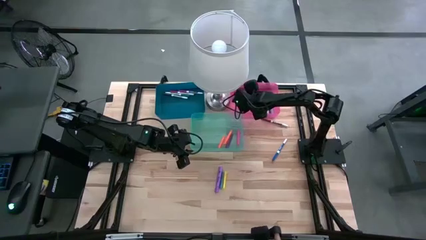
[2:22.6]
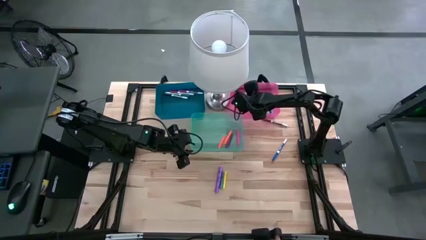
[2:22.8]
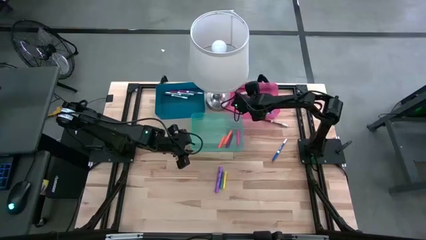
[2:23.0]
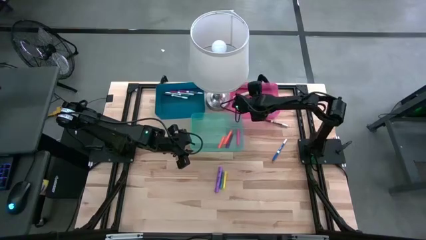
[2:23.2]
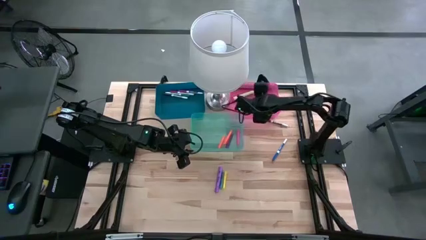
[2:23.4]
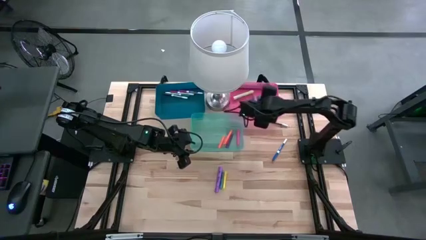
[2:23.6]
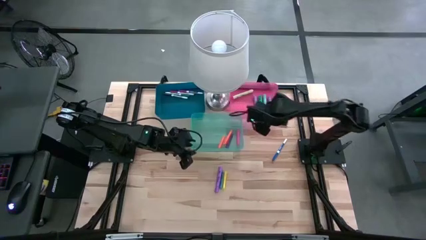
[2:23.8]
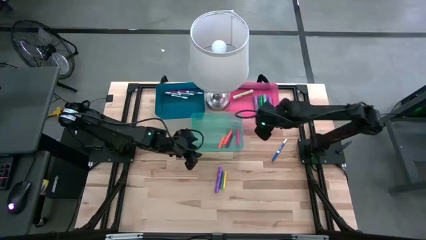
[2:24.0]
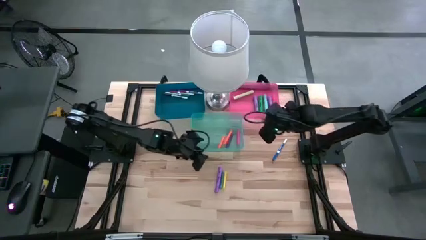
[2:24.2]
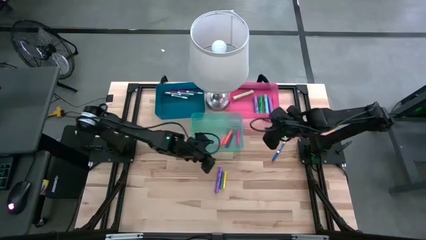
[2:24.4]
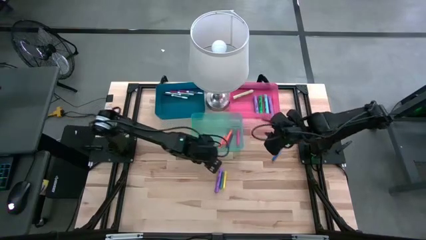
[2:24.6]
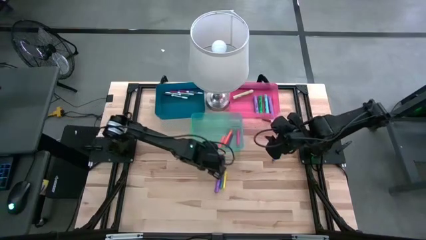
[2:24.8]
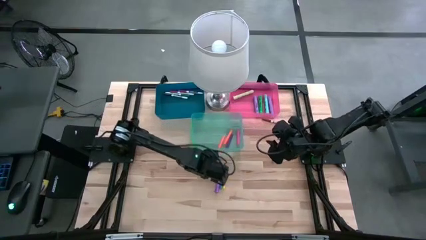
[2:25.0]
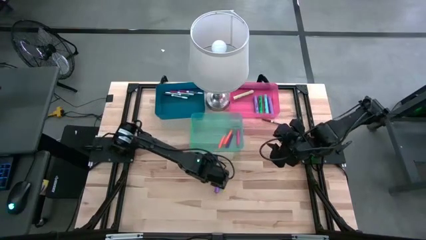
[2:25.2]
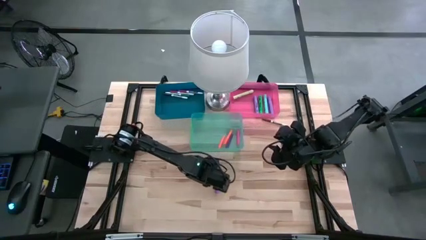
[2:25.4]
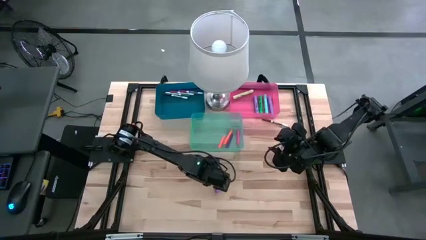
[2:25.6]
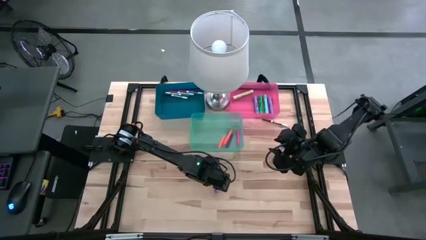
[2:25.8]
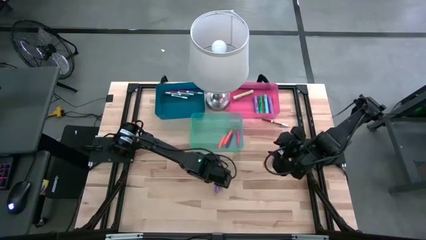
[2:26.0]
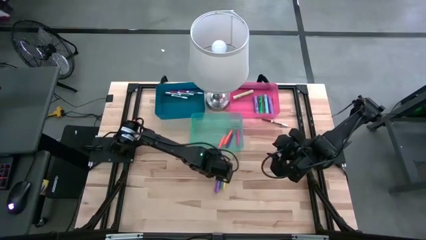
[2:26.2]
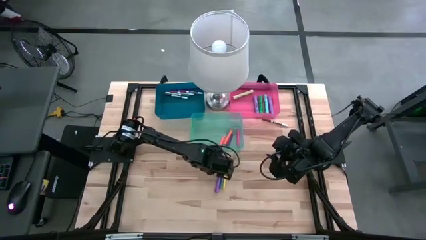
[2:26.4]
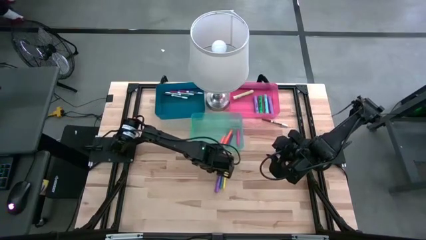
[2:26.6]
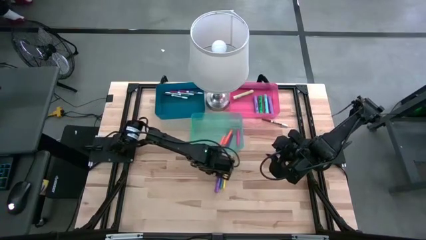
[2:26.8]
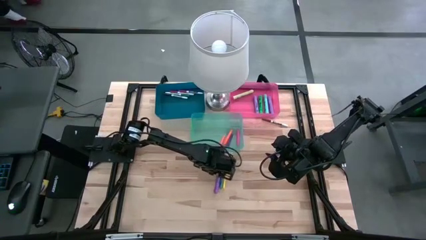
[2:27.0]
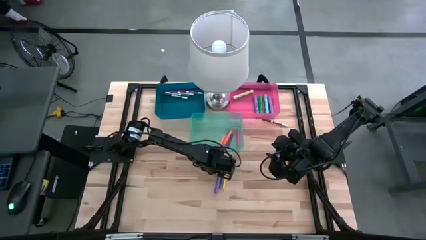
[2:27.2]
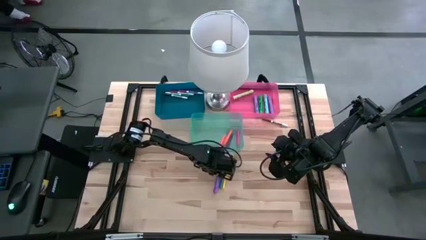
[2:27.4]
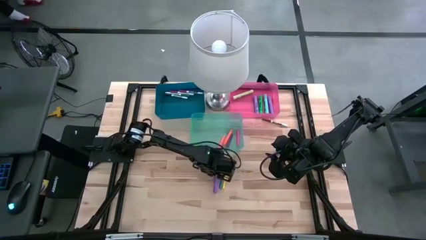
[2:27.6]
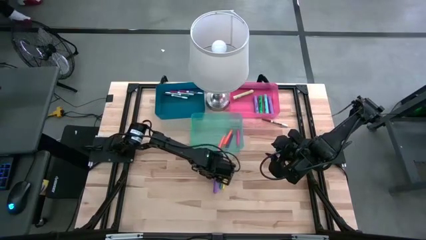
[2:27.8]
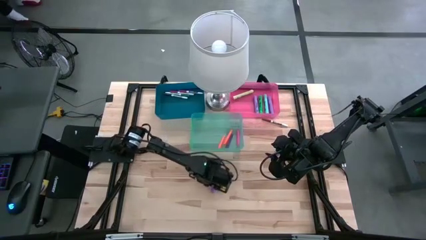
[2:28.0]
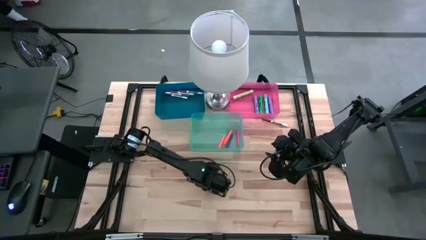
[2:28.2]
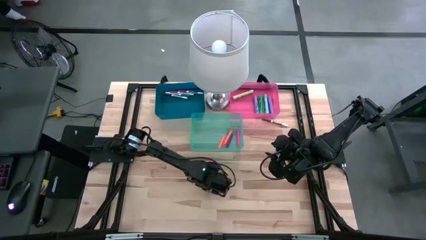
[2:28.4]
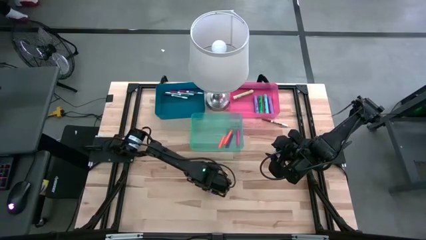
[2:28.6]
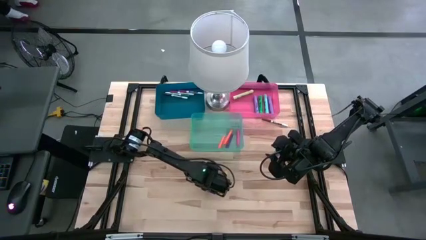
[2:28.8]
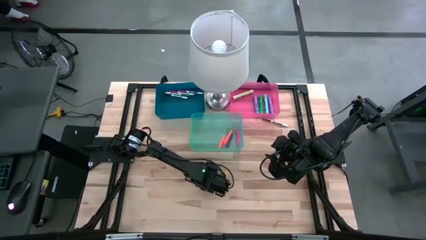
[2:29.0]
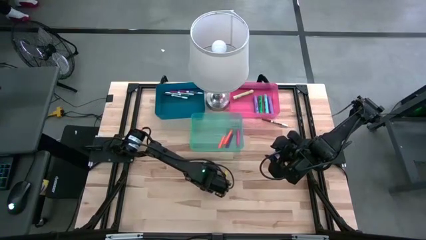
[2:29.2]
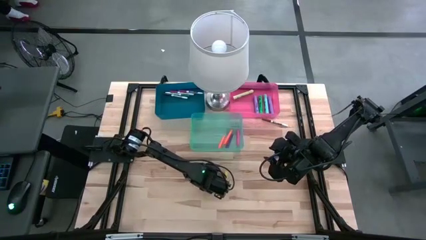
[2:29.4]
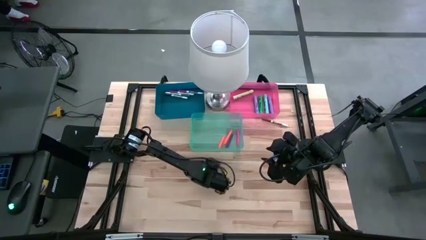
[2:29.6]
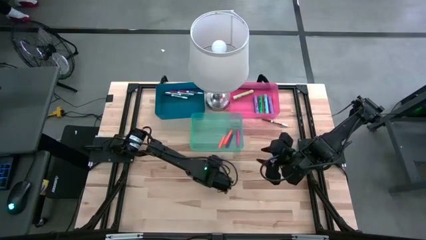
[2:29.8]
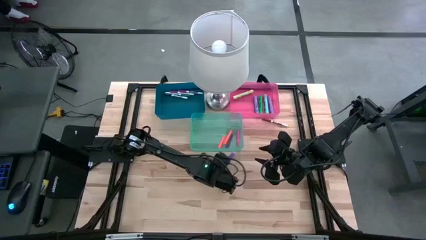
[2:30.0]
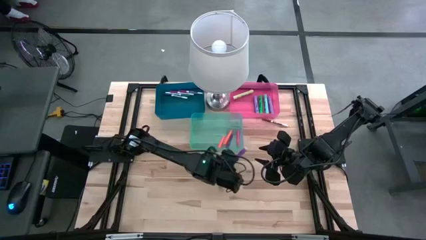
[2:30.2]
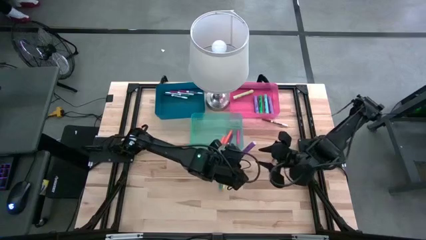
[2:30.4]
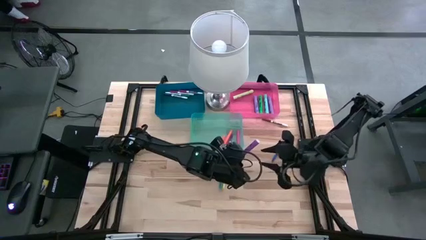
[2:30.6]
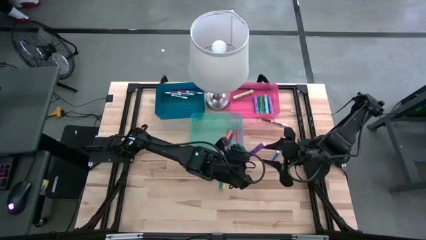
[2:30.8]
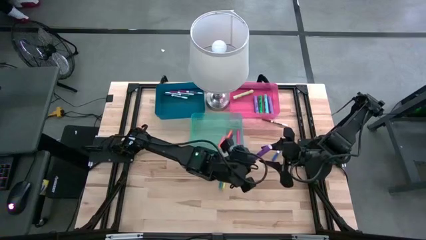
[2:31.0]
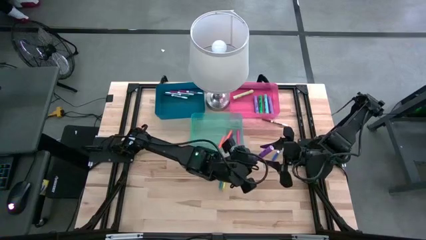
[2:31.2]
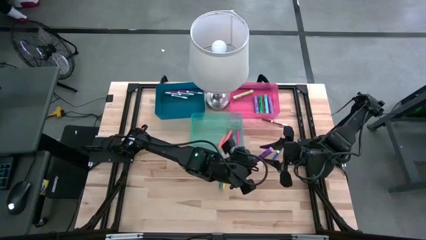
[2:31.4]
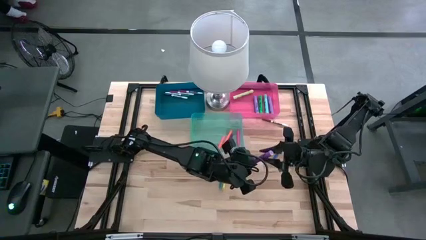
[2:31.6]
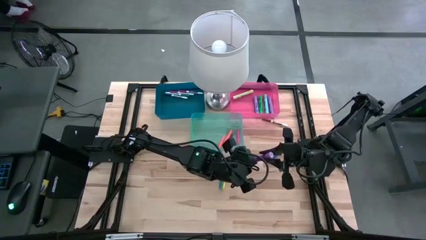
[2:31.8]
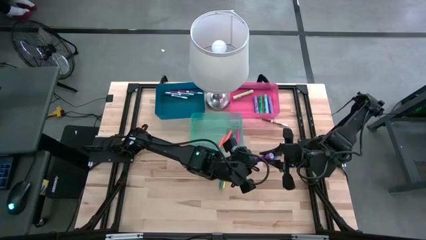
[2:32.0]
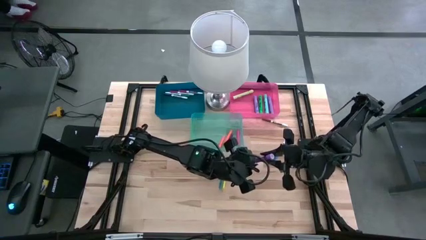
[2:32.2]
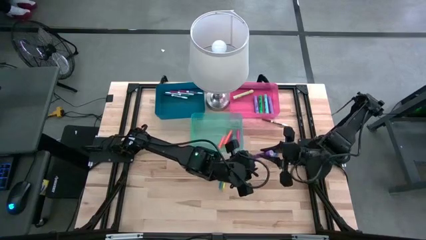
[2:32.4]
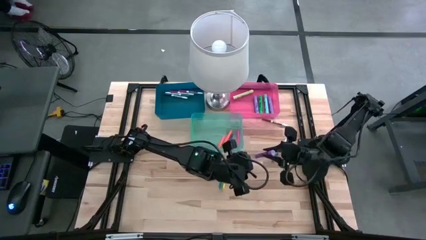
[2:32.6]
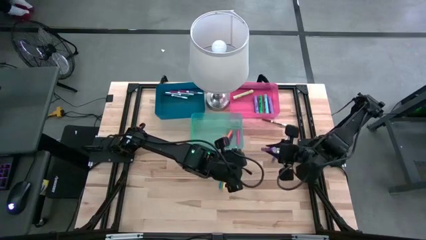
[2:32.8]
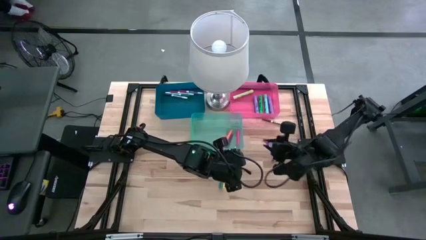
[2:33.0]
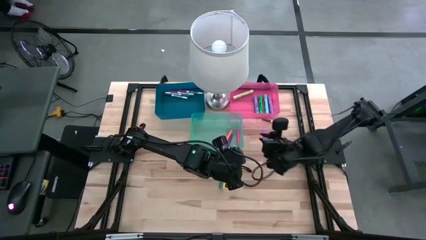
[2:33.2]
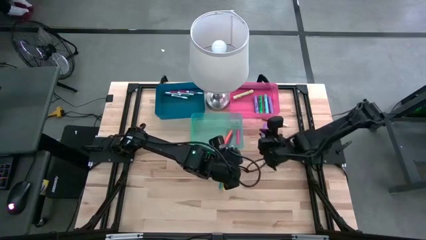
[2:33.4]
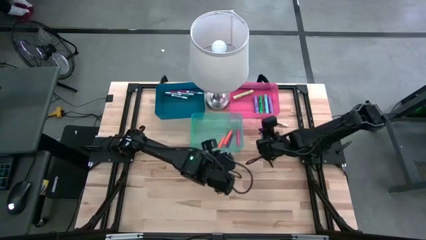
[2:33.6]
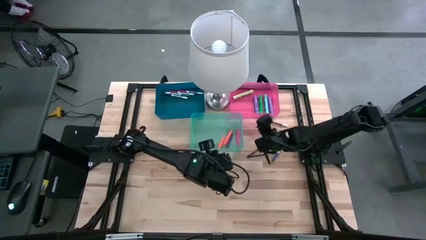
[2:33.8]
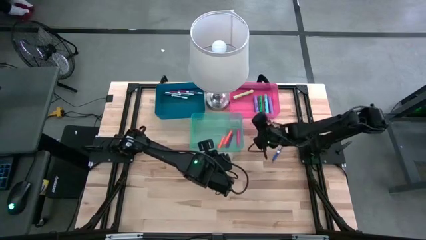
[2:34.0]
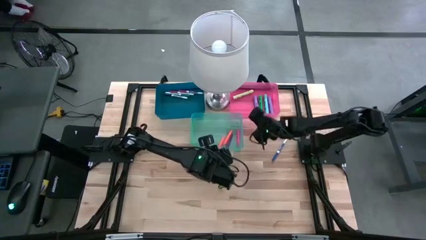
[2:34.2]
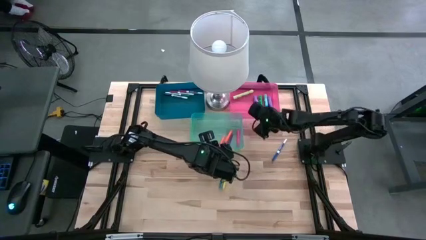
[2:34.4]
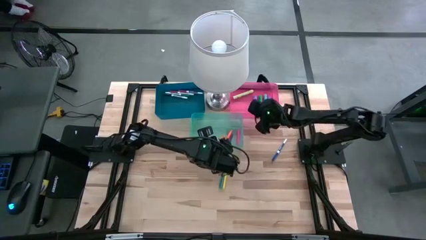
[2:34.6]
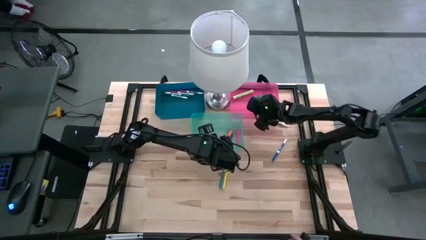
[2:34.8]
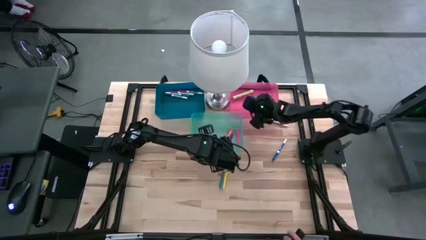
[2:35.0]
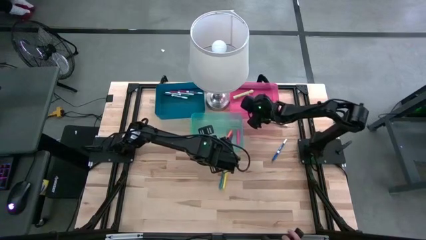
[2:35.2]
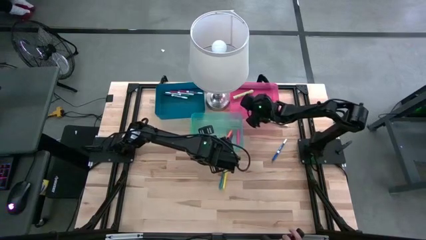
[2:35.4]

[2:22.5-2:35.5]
Task: Pick & Place Markers
Put the violet highlighter pen into the red bin

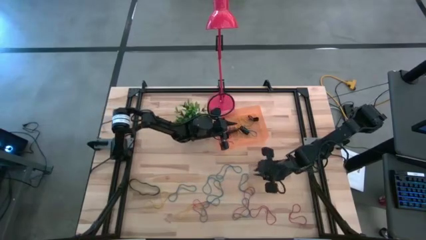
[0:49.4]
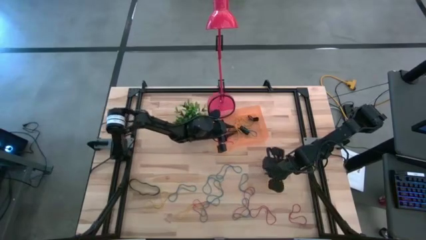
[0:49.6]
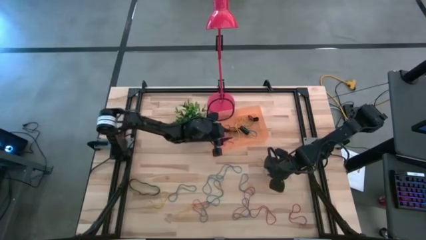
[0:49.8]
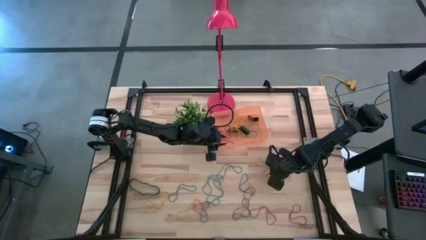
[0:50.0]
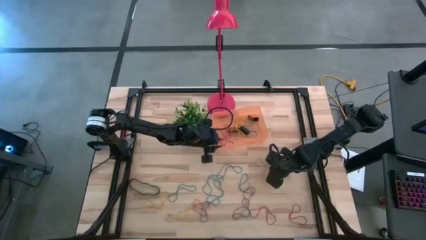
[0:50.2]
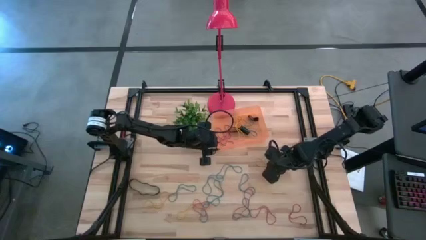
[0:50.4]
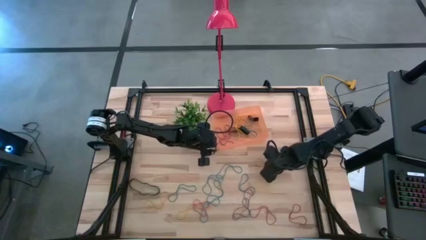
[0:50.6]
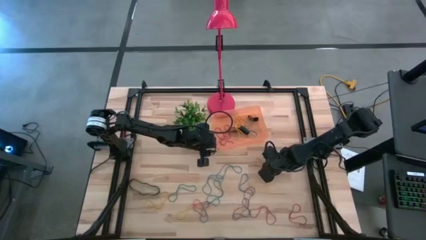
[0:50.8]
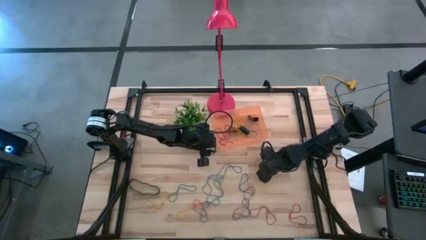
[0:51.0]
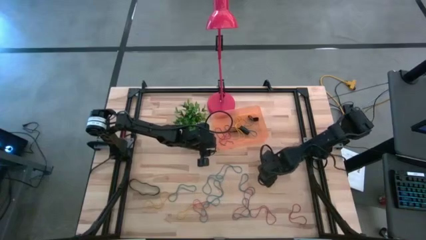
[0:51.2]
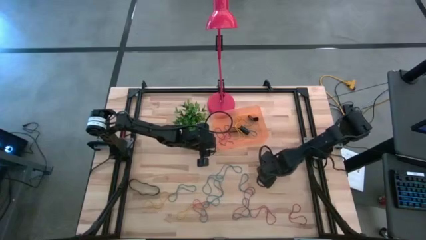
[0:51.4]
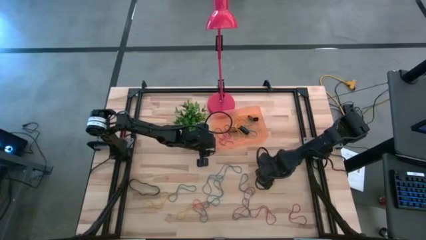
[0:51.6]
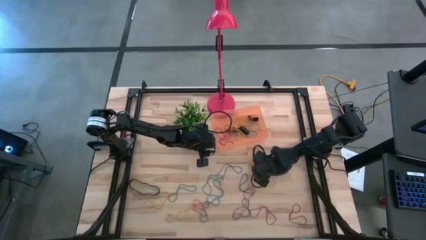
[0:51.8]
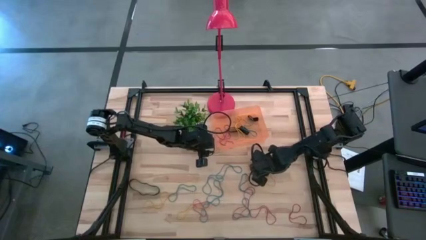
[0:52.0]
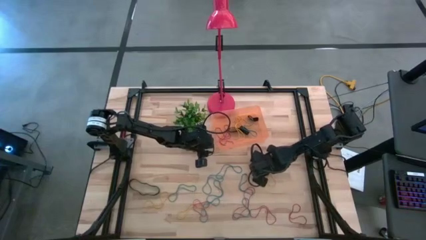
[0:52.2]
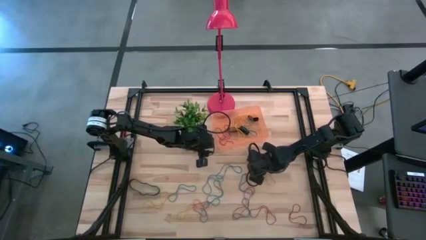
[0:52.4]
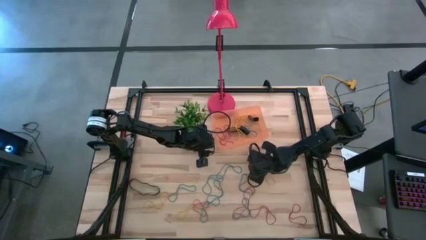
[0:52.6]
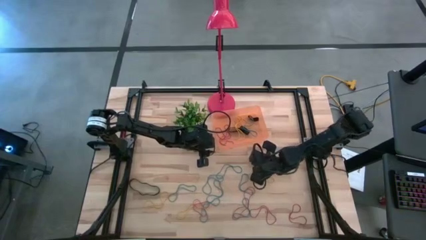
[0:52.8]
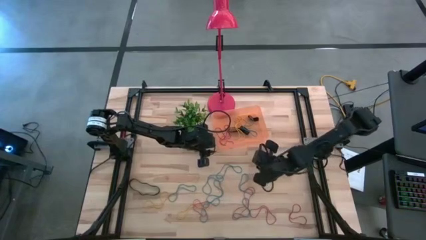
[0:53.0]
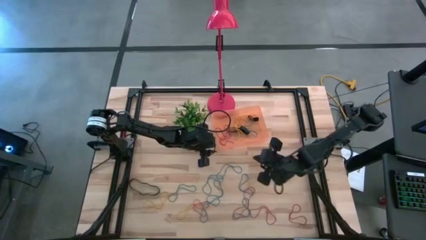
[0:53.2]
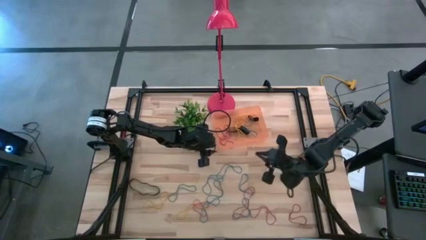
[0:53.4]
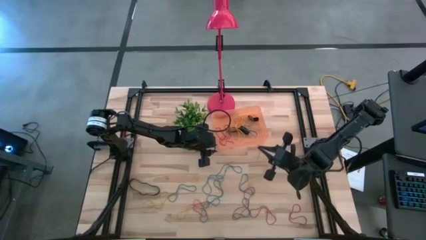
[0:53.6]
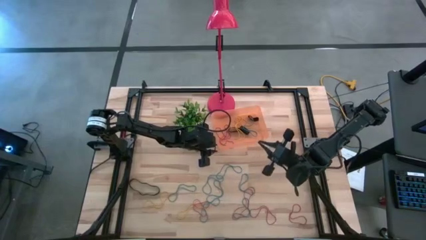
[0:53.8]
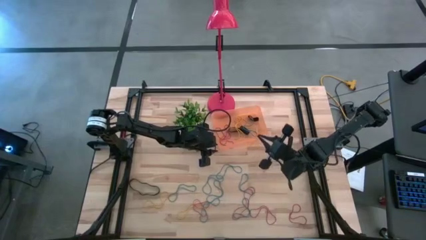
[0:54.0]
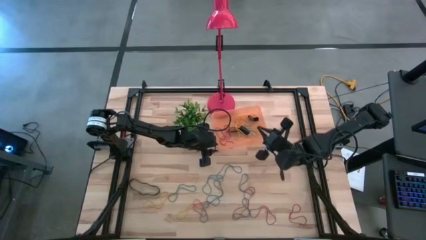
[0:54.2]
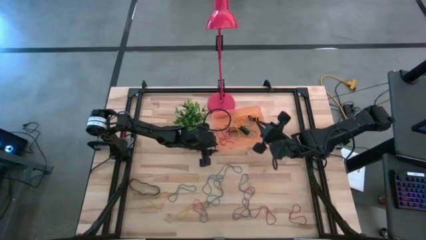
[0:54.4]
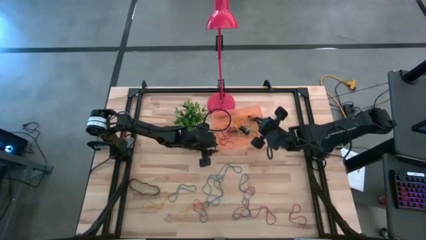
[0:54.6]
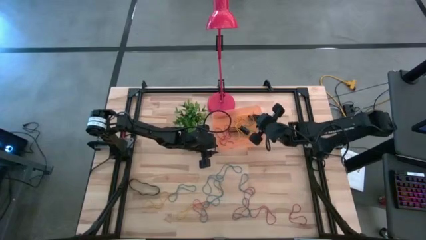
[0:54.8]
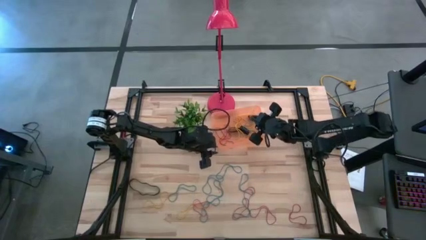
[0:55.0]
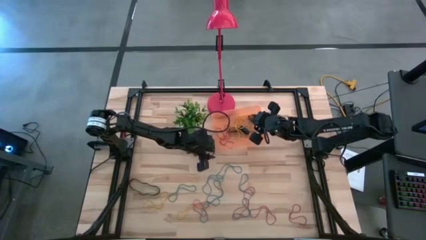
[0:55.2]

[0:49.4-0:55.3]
Task: Pick and place rubber bands into bin
Put the top right yellow rubberband into the orange container
